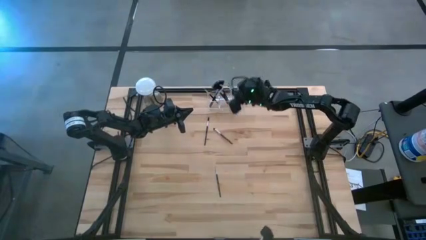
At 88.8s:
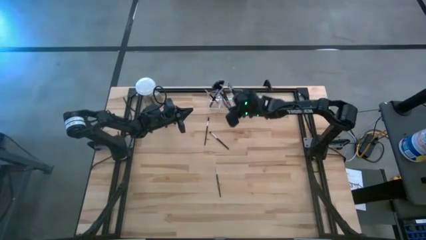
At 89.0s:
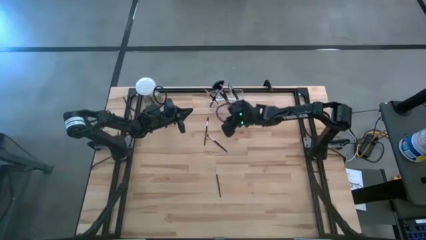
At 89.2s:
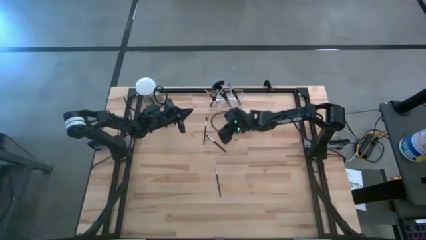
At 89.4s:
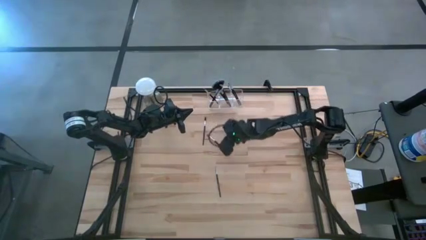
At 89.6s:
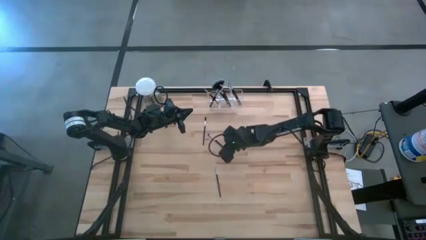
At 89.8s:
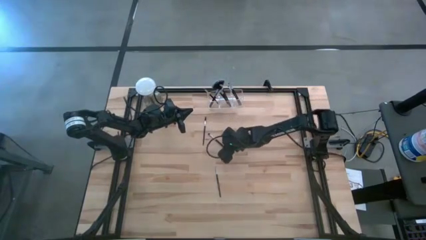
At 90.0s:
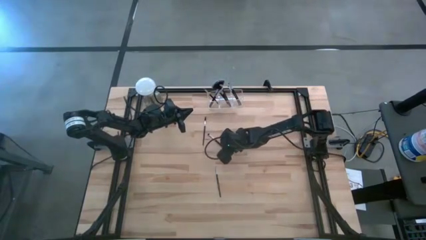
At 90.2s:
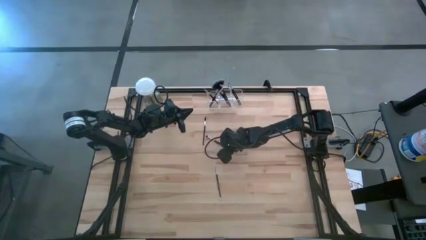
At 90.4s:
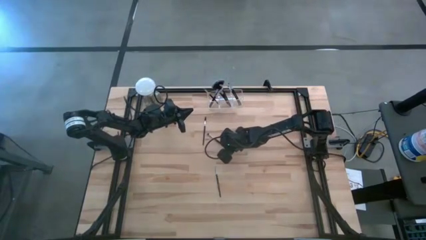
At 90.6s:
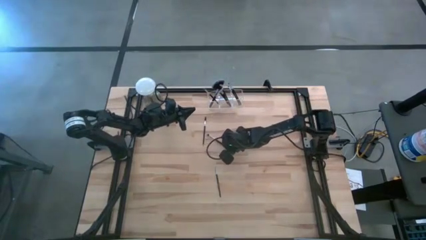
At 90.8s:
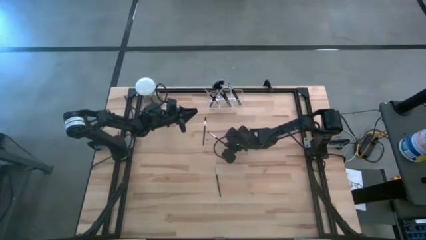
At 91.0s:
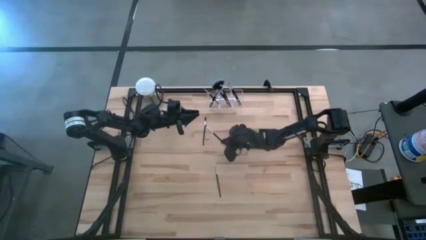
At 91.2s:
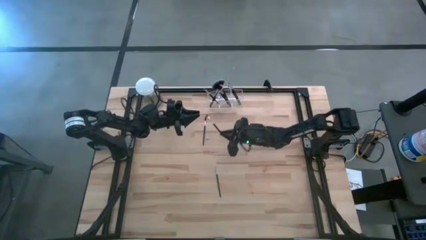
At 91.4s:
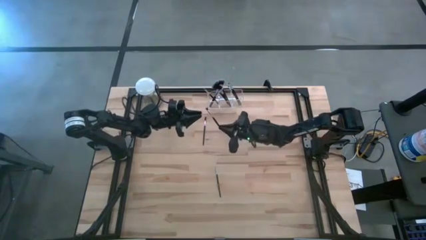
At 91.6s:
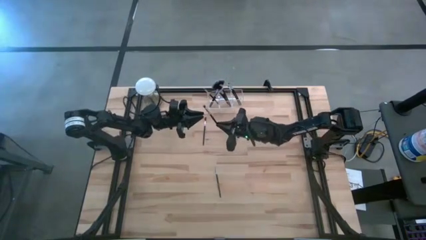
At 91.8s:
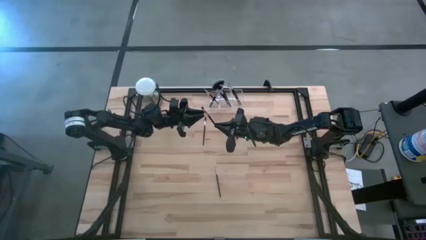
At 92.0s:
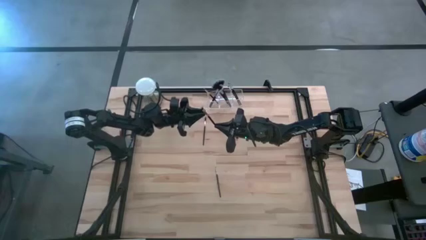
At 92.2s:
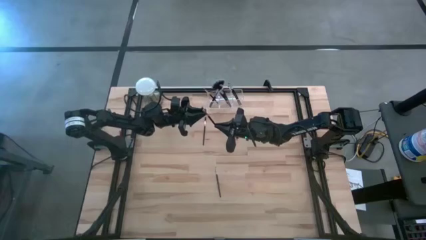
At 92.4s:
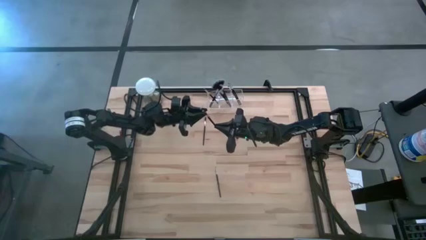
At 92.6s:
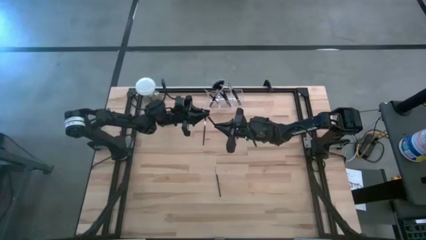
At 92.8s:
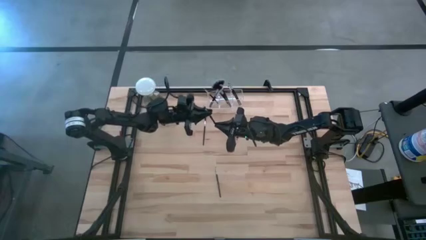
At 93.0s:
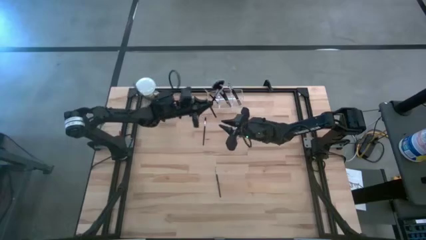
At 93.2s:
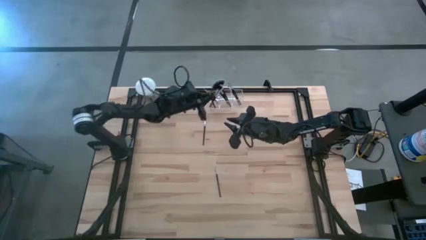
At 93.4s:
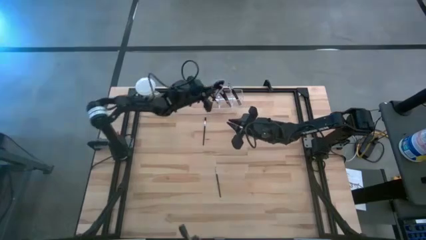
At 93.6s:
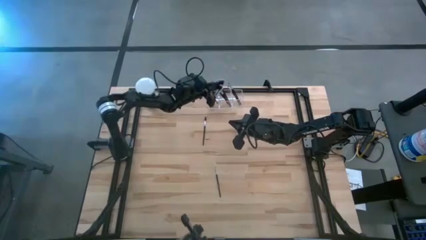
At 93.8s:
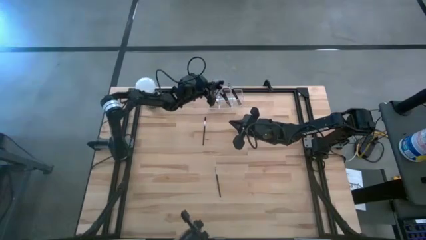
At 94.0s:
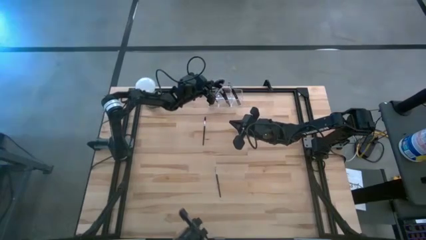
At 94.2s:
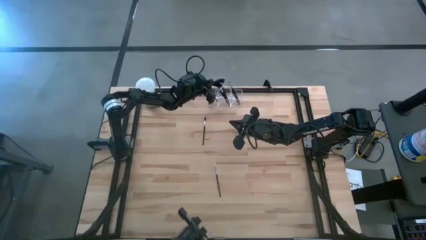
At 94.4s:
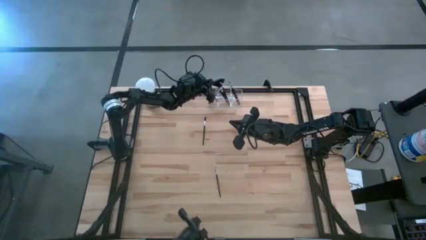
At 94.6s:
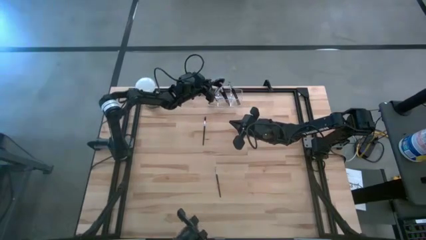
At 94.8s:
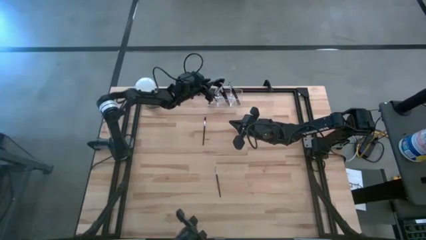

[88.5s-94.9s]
Task: Pick & Place Makeup Brushes
Put the black eyeshadow brush into the transparent organizer

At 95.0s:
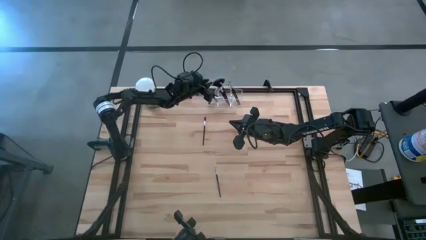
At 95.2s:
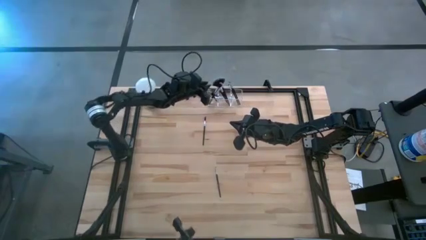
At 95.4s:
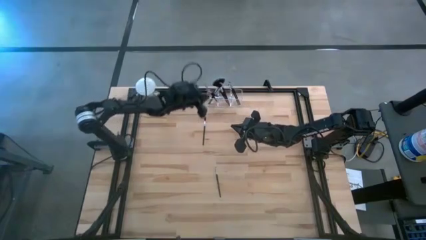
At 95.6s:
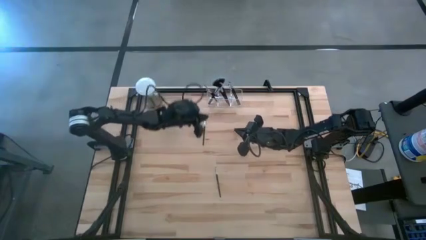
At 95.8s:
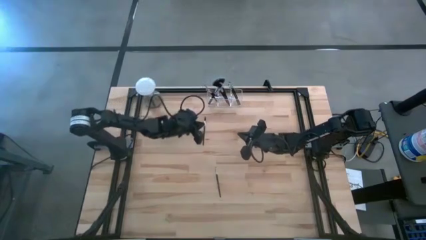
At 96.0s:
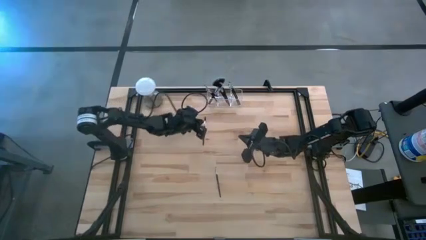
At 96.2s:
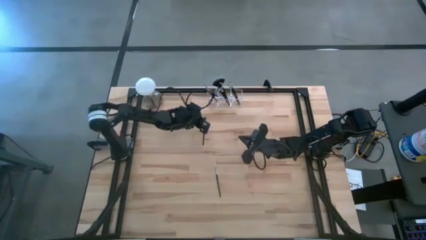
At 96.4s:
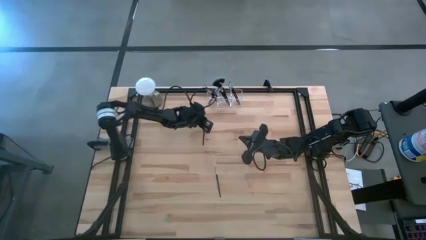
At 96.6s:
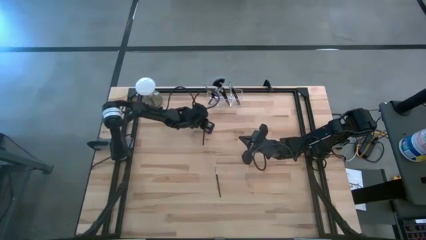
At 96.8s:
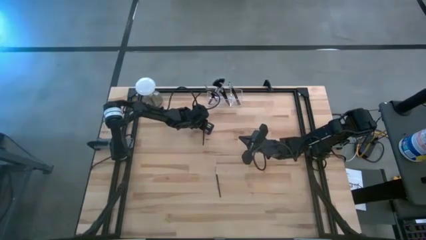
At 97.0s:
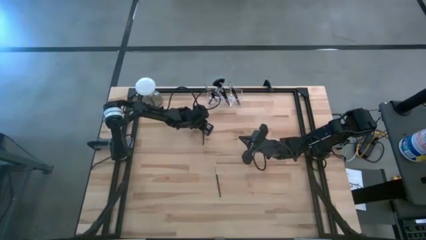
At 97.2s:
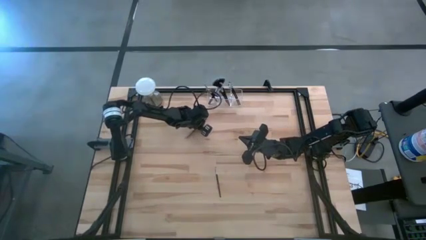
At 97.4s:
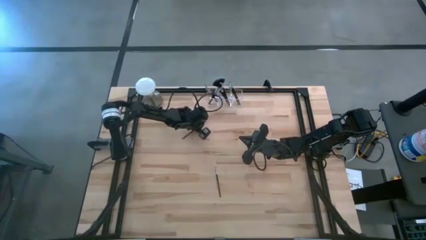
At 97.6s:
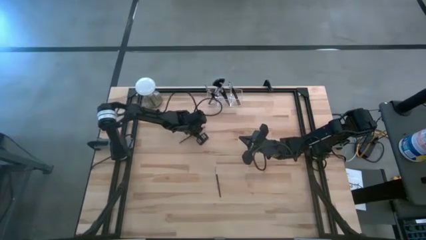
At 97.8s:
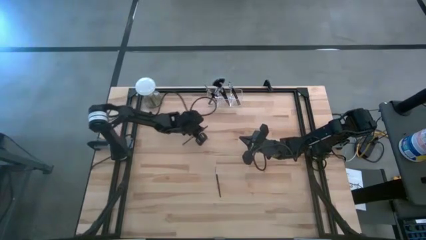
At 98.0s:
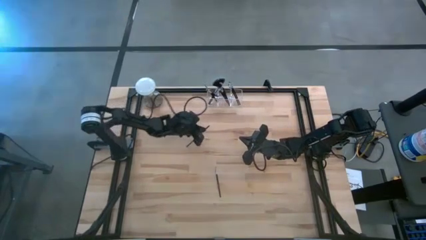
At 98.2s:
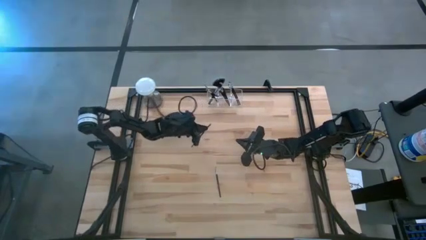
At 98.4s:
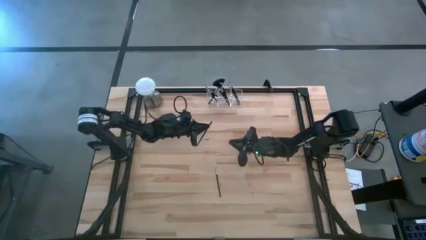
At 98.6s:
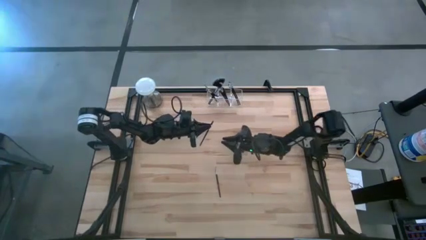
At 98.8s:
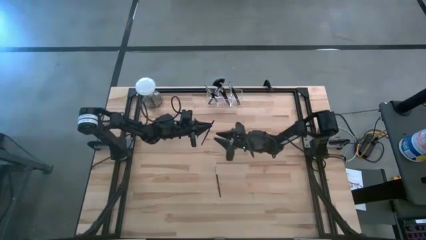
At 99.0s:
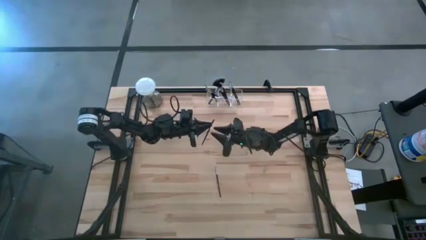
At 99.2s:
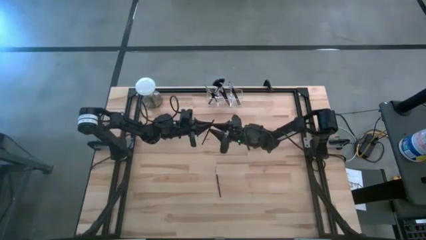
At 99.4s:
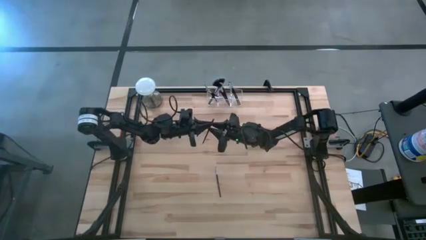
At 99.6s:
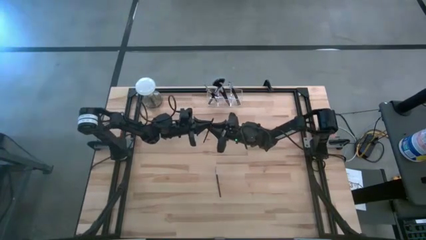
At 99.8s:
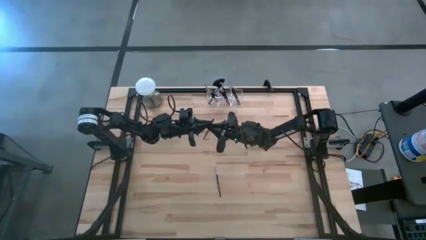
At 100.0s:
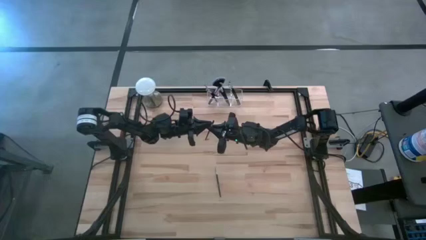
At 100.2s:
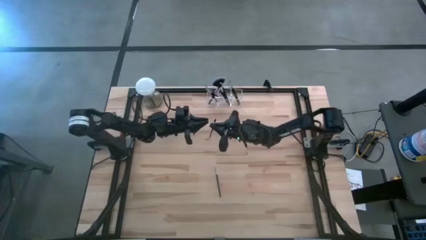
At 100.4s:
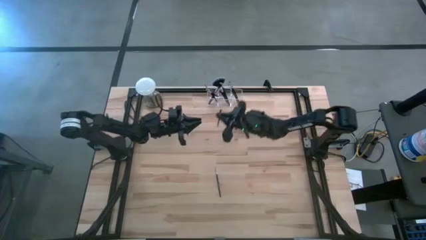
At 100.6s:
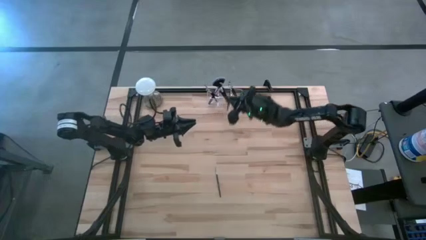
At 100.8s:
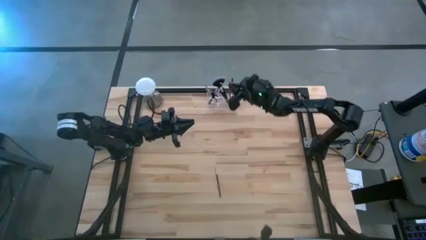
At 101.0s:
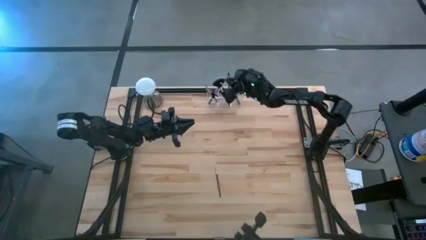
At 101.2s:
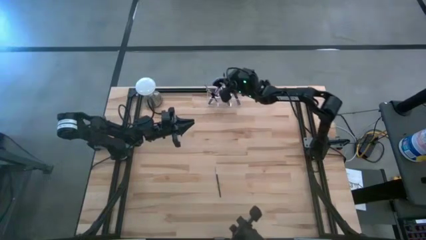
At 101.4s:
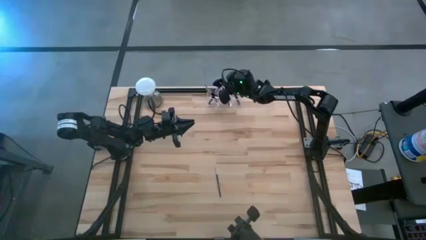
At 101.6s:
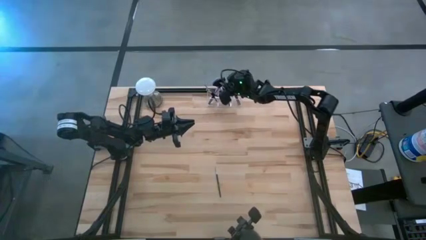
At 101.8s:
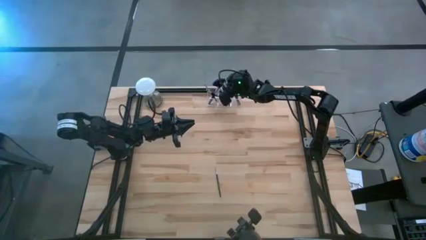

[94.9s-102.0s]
Put the black lash brush into the transparent organizer

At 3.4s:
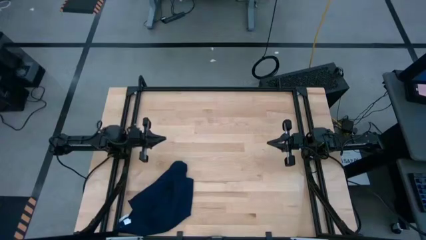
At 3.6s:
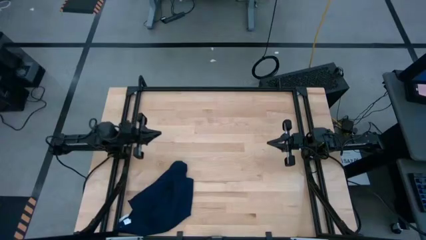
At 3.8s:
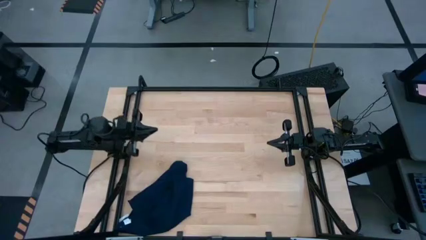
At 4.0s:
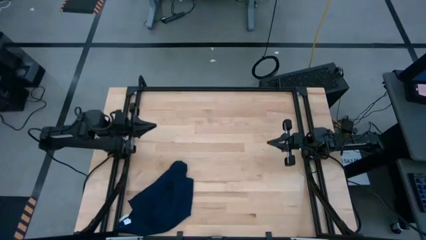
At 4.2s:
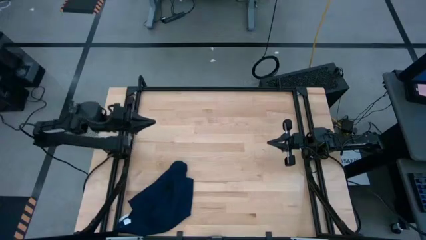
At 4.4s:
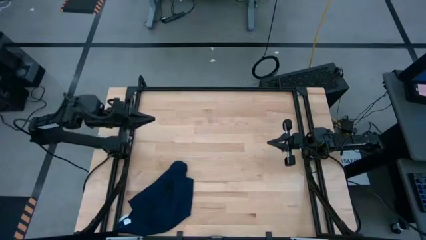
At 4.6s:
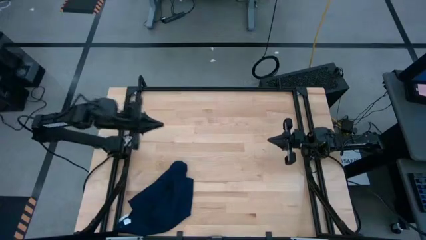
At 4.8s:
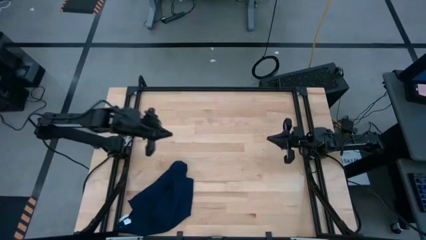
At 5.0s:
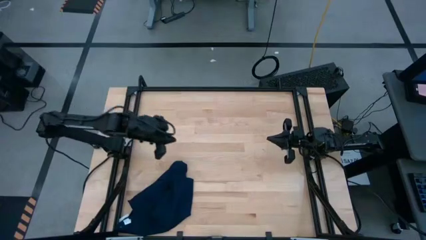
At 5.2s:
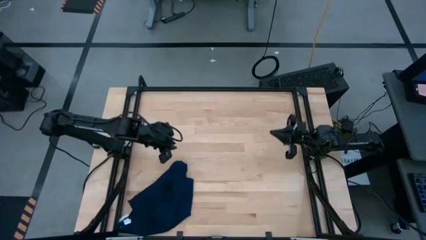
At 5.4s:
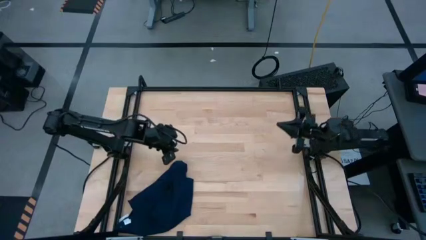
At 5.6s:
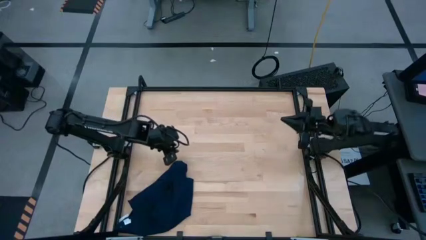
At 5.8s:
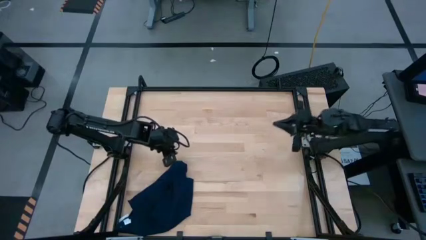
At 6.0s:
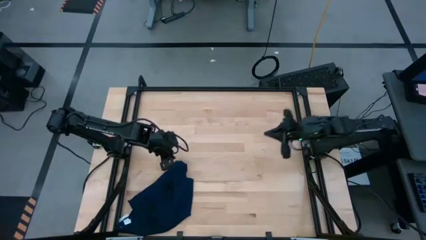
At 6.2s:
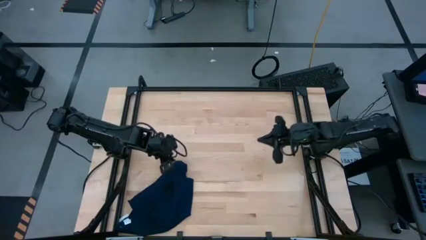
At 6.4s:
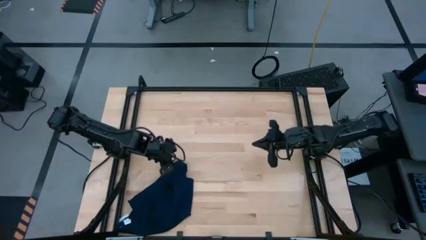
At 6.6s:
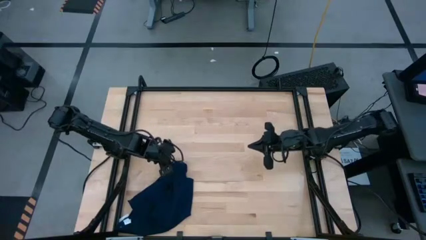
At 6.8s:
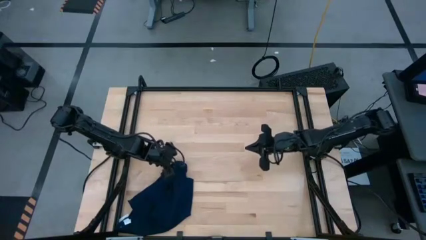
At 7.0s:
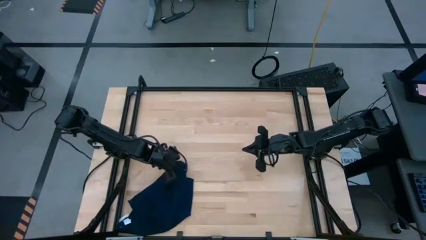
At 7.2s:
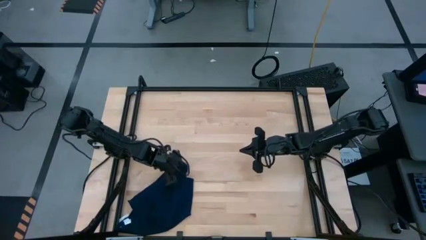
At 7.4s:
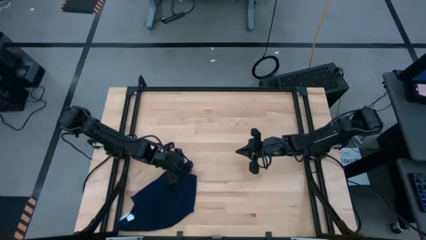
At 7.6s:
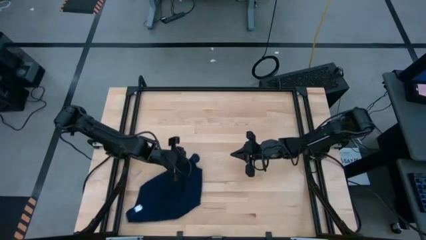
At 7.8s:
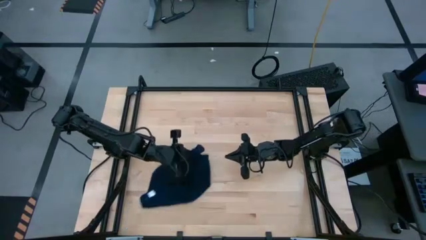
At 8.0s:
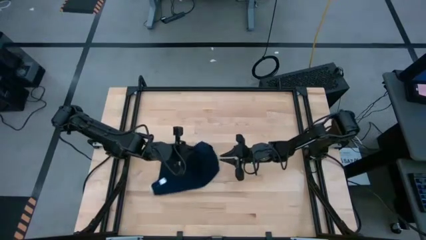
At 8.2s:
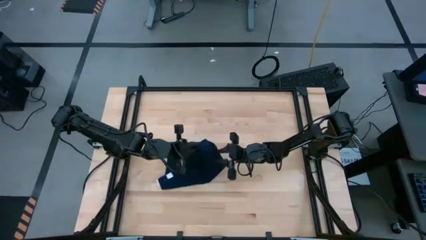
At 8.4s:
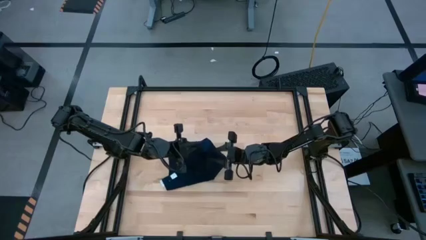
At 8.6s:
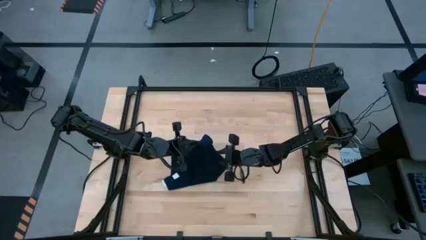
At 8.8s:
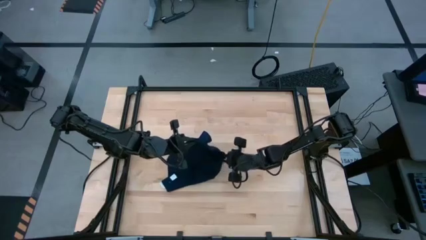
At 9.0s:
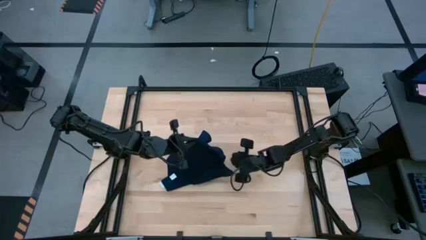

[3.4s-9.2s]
Task: Roll towel into tight, uniform cylinder
Roll the blue cloth napkin
